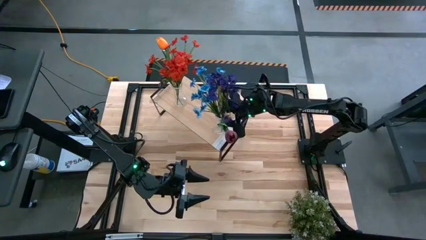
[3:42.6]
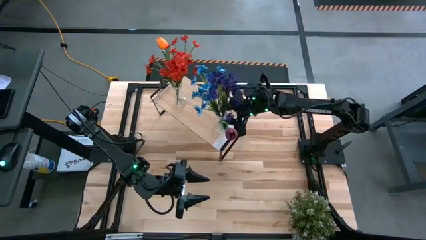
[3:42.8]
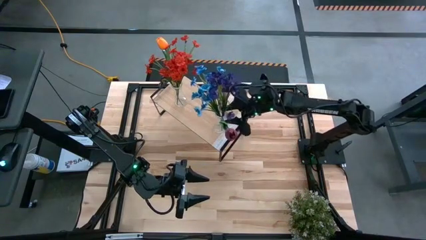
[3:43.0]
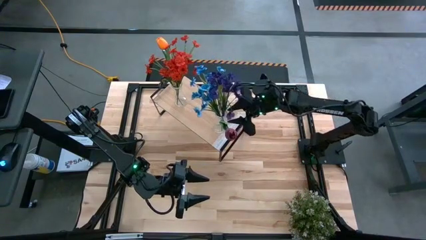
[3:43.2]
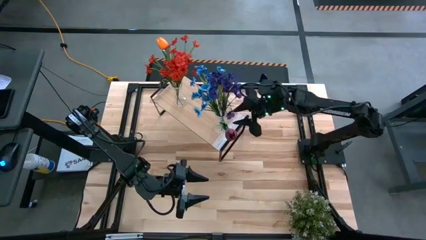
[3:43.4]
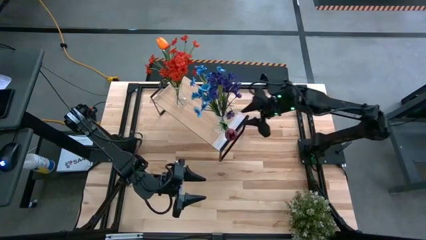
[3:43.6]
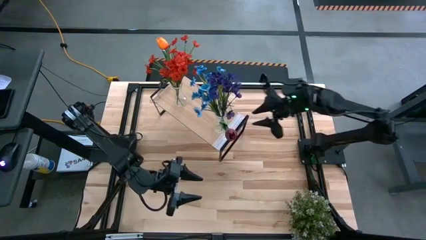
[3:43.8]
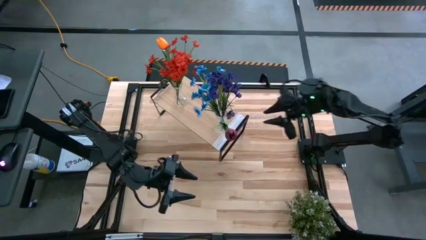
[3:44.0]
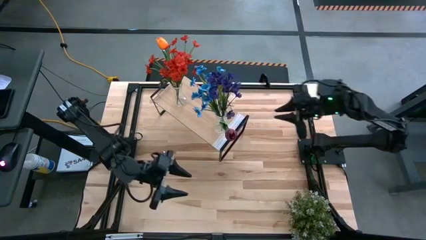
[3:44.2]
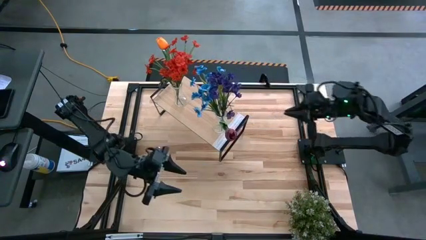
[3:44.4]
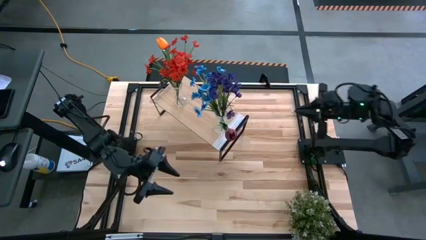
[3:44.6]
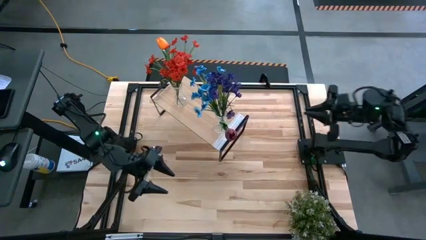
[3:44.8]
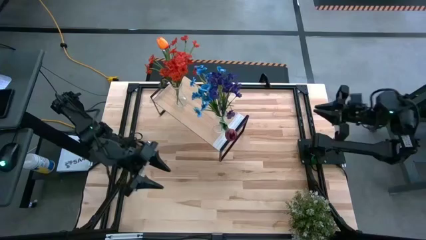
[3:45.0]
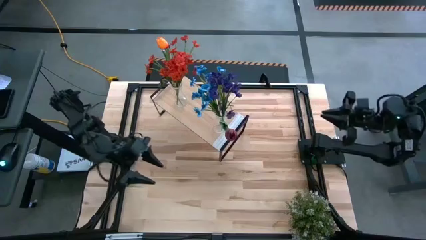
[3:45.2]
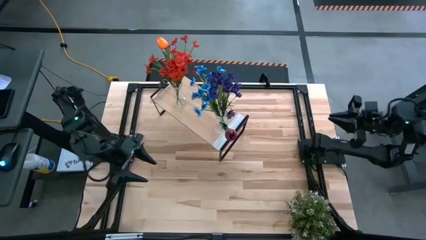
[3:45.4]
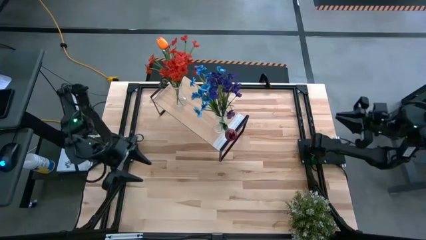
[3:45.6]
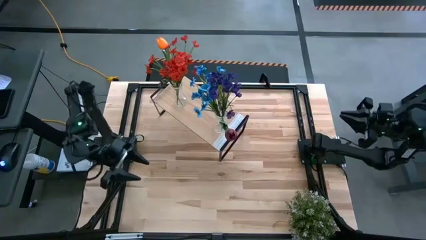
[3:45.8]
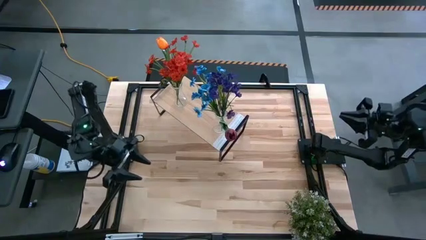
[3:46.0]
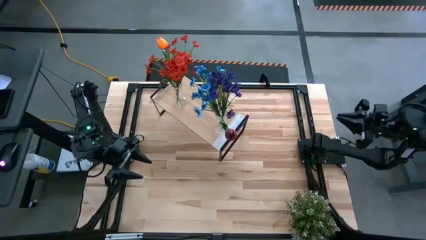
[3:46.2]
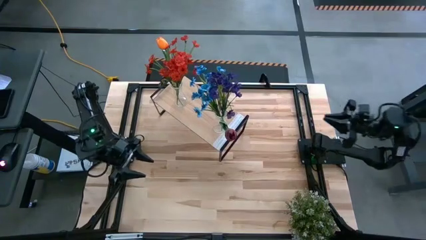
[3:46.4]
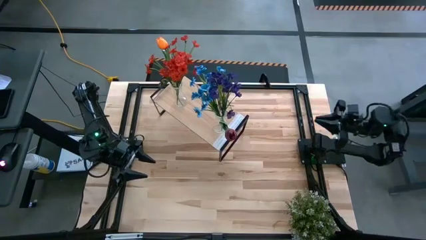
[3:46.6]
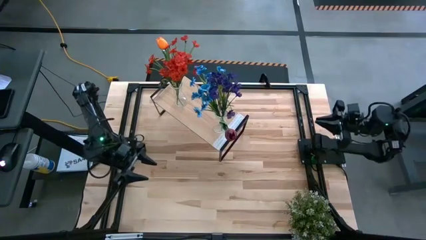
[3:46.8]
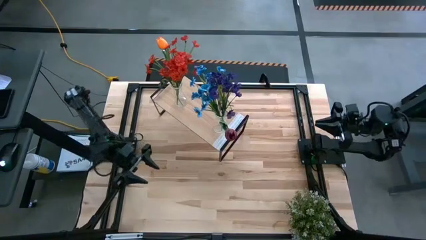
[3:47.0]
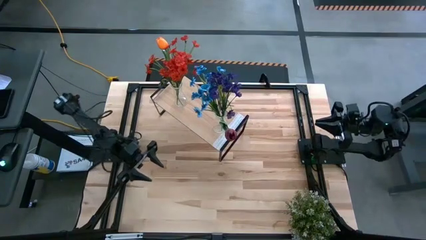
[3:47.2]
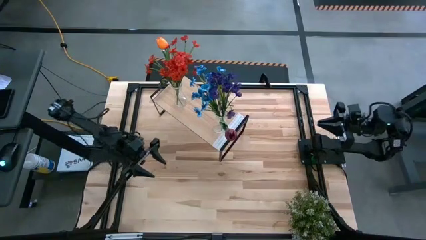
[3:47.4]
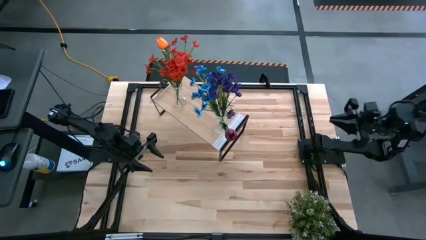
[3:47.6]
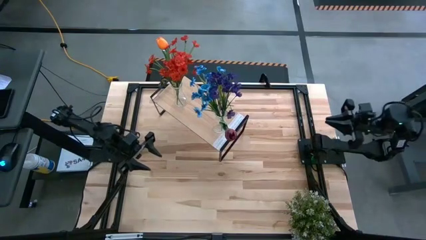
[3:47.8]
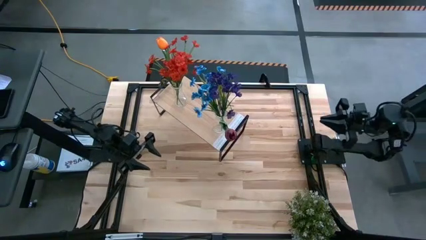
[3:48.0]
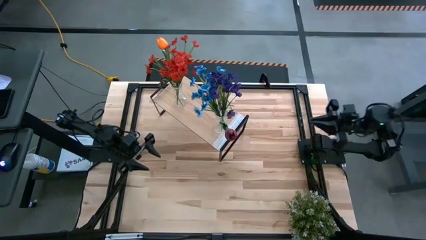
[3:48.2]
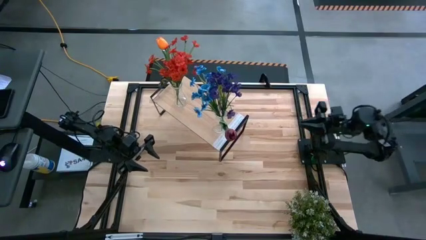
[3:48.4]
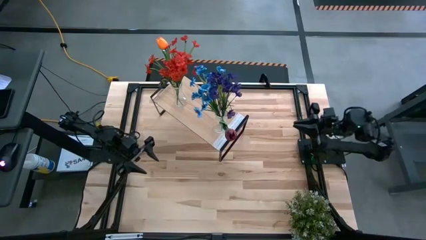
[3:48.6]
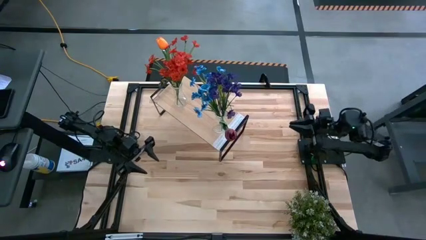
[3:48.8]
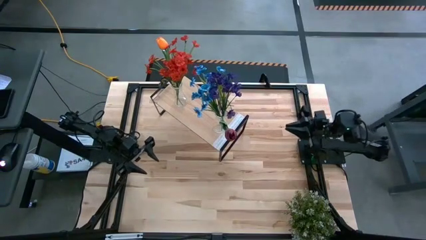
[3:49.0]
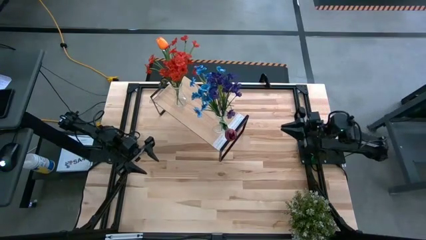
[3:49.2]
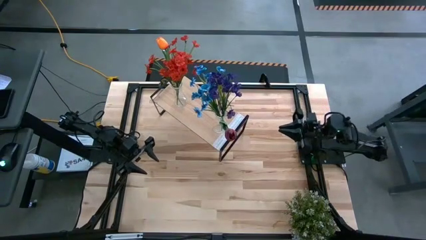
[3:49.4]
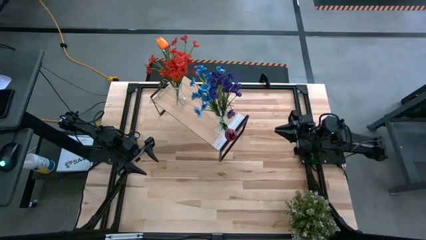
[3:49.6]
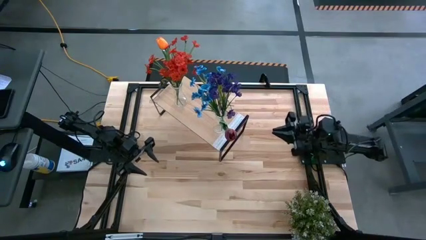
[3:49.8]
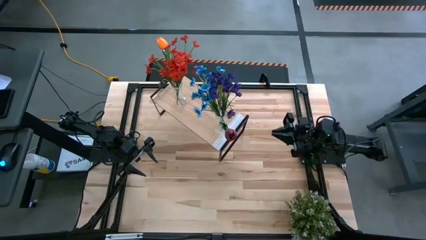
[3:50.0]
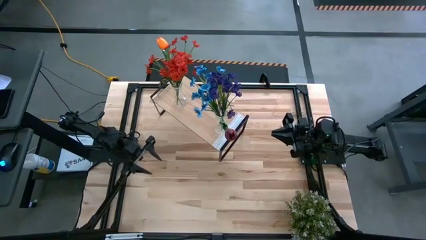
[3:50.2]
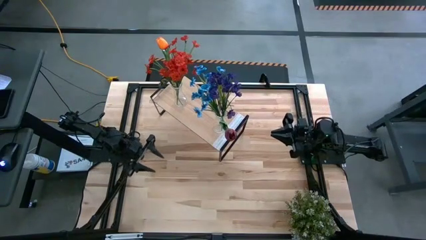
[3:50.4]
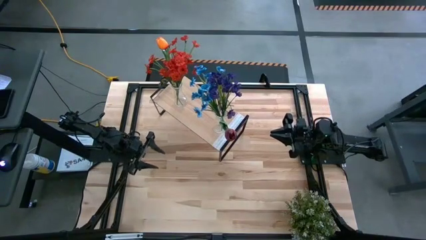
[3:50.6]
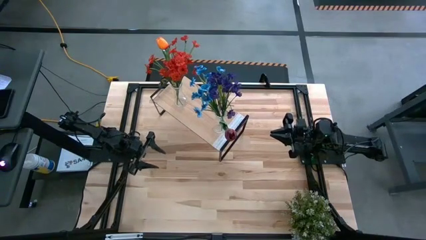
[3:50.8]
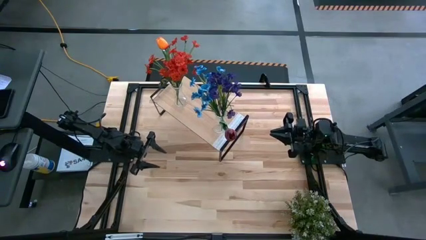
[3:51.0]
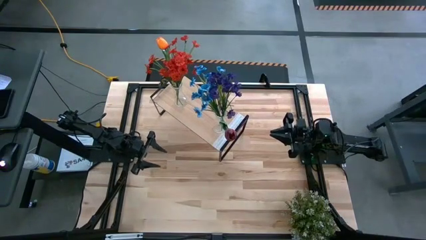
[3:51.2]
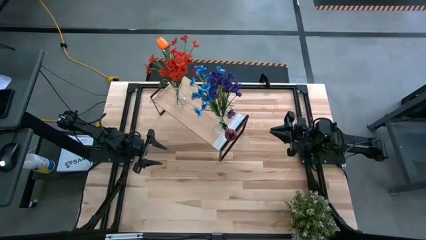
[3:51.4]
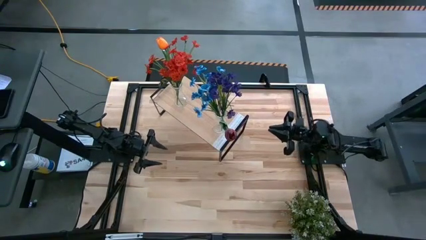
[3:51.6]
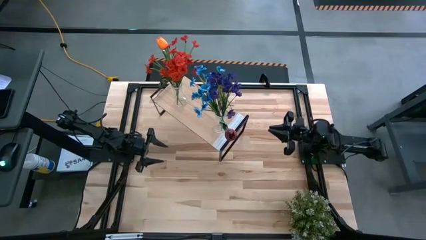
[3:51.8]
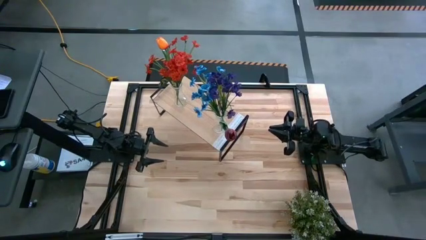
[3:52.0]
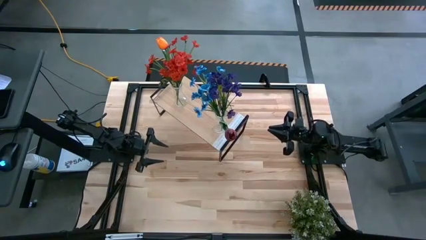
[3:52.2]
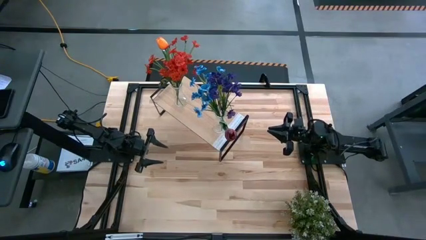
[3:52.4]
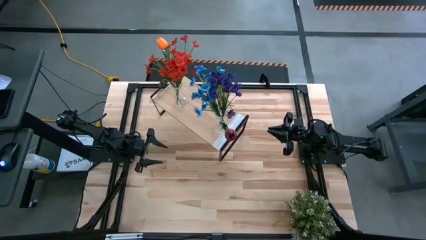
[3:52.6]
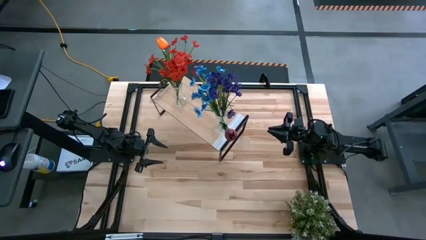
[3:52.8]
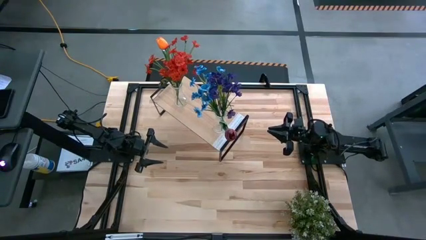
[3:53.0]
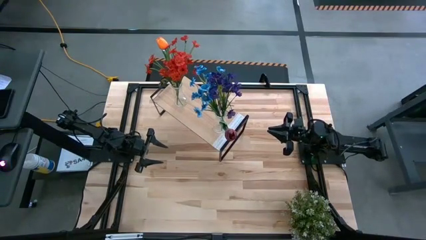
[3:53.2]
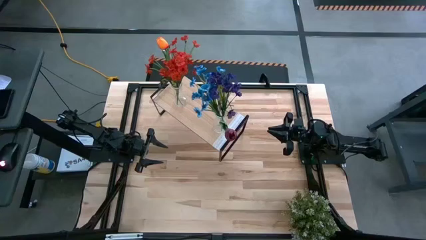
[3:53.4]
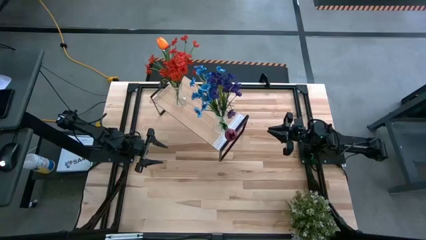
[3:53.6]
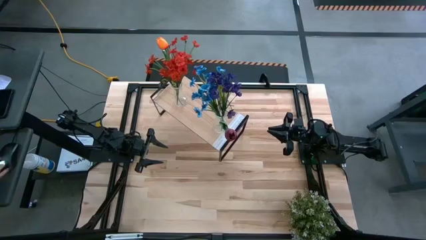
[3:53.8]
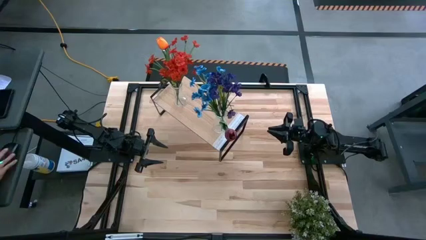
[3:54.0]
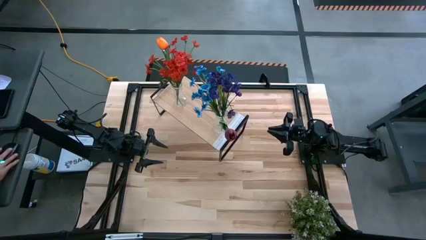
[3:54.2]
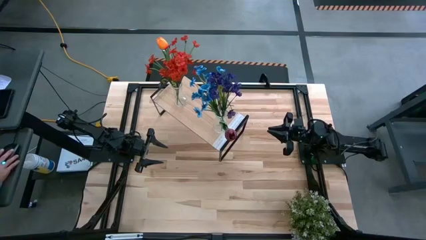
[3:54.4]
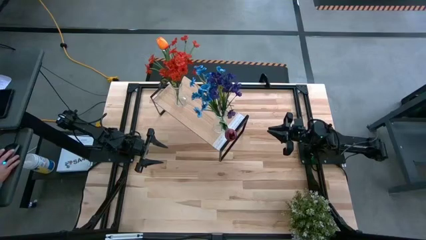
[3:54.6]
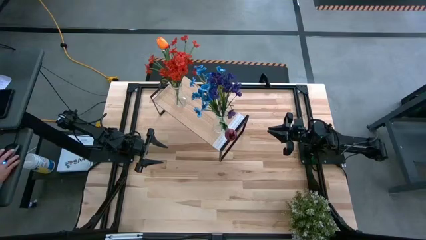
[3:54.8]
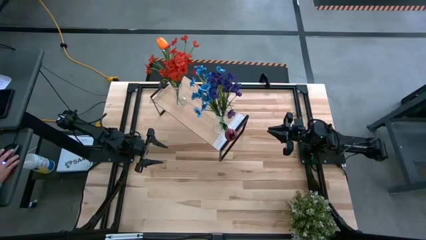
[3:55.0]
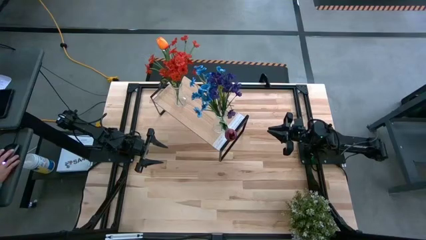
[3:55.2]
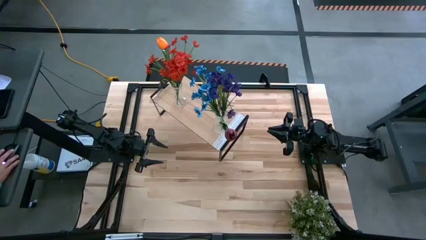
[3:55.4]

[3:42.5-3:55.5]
Task: Pick and place flowers into a vace then onto a shelf
Return to home position

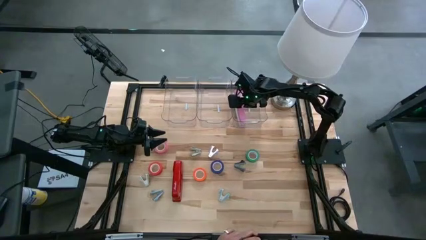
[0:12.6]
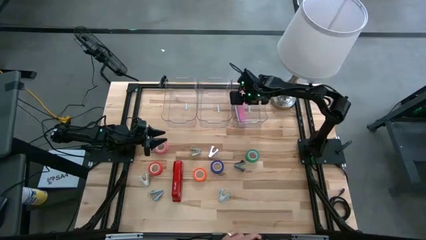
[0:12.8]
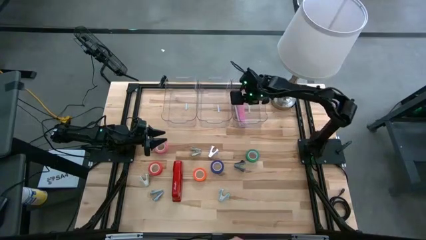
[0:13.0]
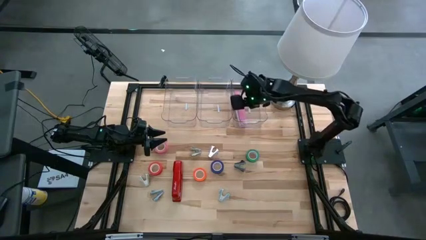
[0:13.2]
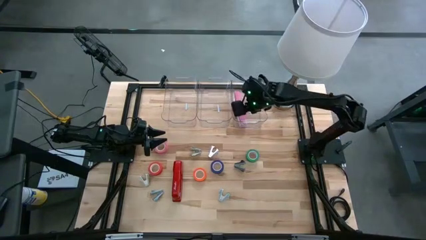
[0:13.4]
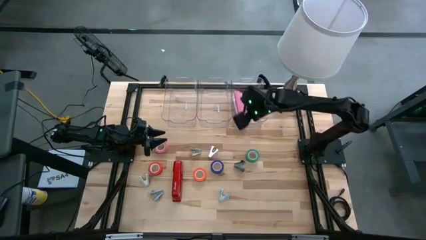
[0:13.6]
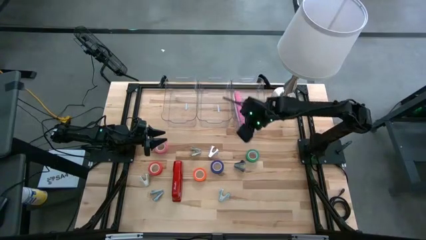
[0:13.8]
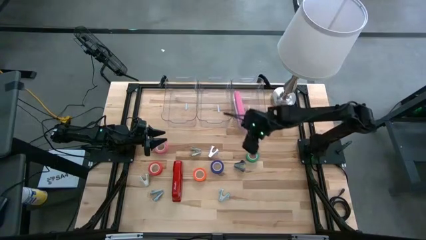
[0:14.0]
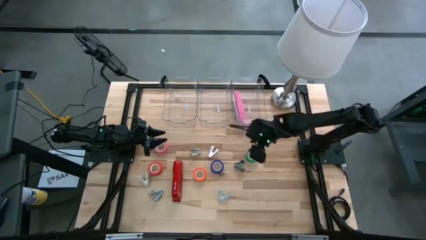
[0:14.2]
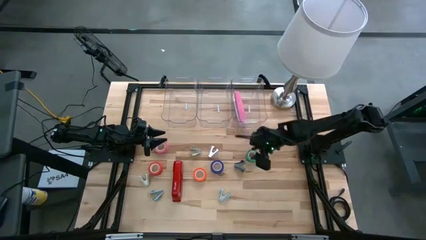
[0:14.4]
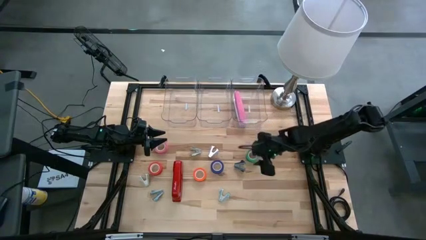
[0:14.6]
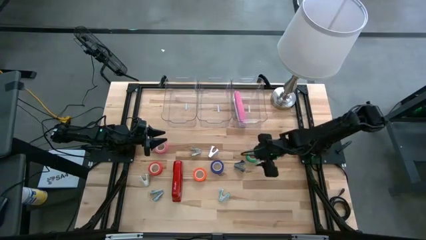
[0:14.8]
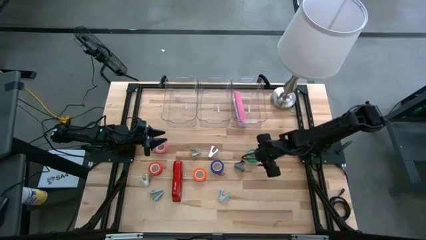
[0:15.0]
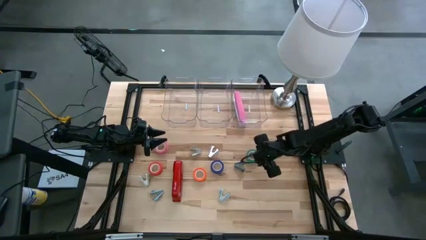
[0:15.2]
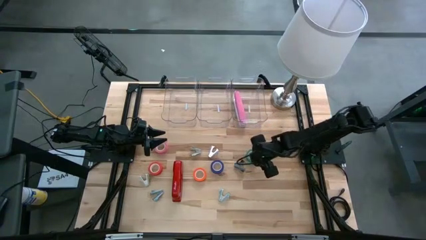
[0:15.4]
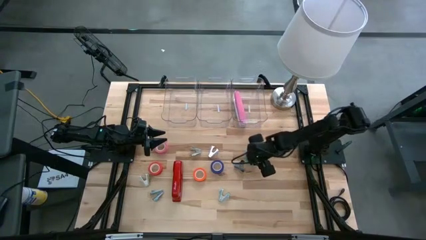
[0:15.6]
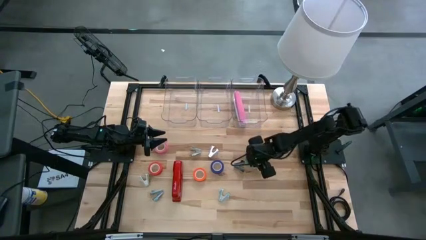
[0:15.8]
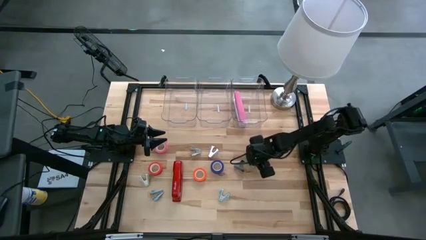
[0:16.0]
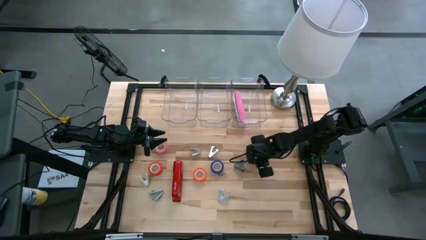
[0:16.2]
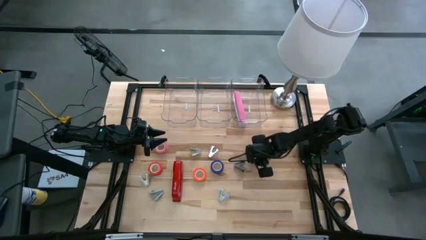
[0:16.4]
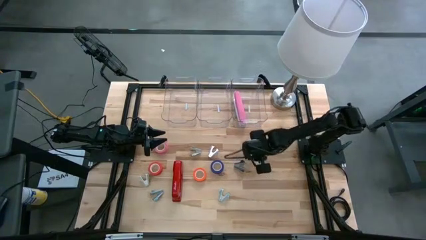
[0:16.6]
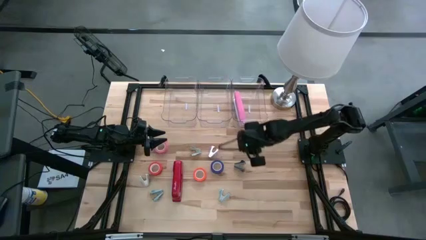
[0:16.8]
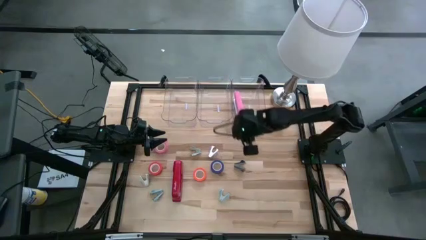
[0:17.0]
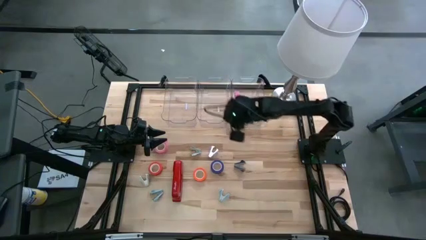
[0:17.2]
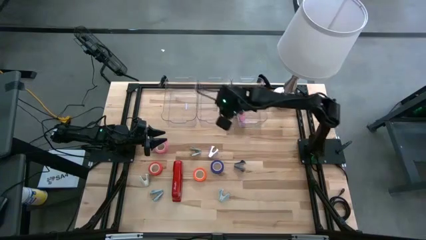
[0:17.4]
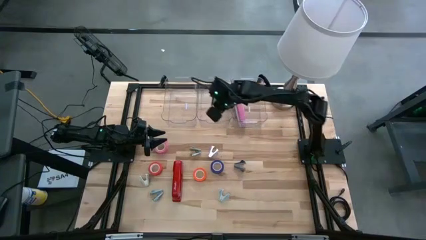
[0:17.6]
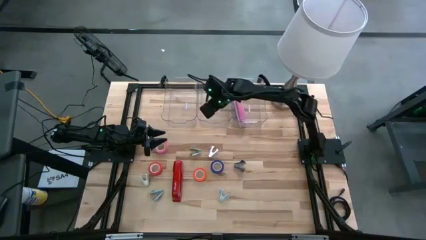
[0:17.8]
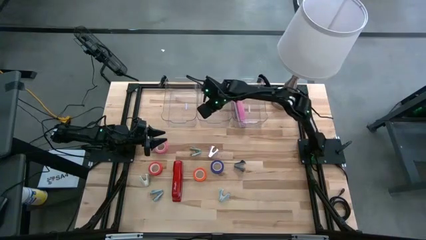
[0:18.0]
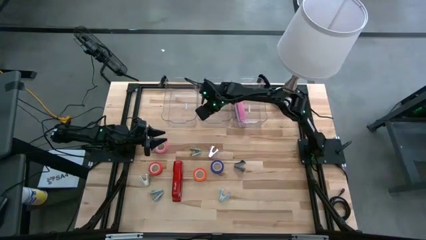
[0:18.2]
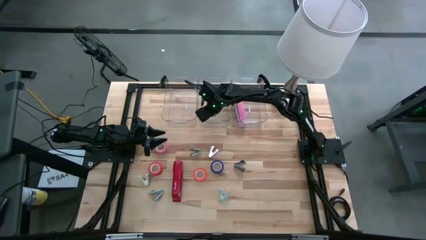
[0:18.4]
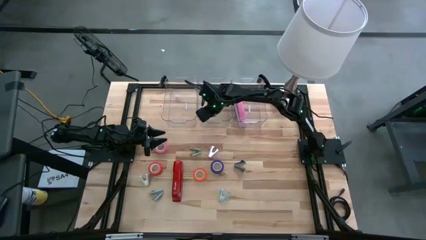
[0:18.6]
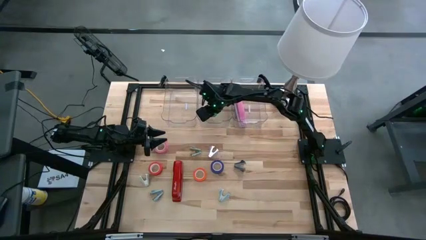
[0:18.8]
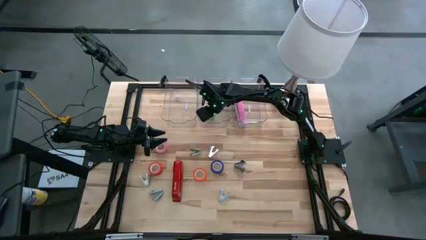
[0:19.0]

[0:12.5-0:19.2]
Task: Pick and place Stapler, Stapler remover, tape
Put the green tape into the middle transparent bin
